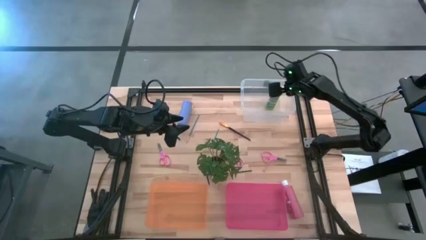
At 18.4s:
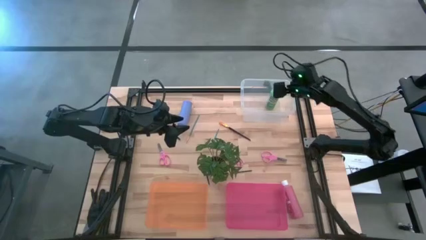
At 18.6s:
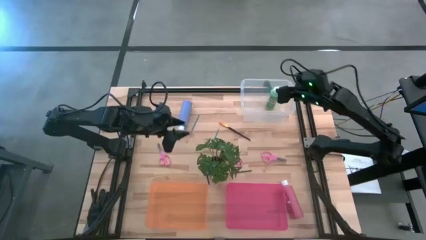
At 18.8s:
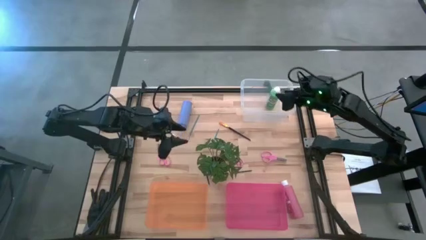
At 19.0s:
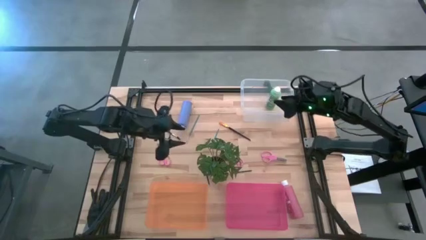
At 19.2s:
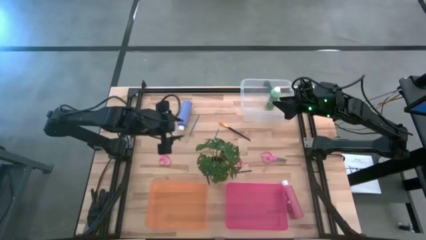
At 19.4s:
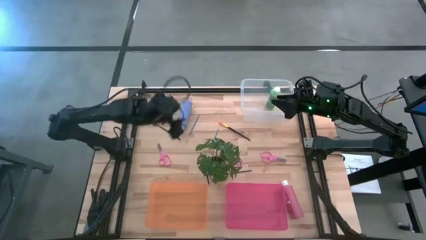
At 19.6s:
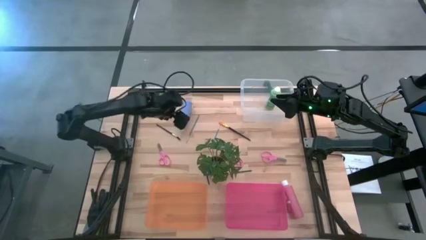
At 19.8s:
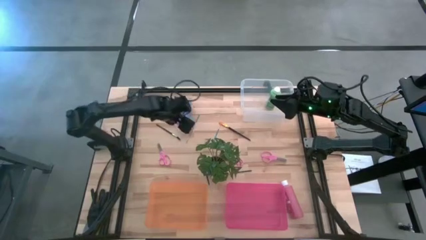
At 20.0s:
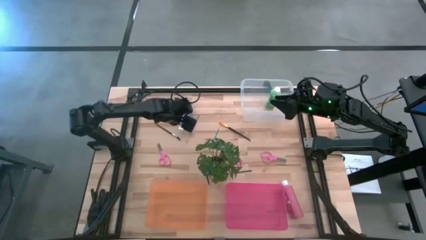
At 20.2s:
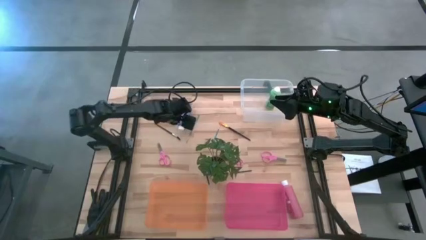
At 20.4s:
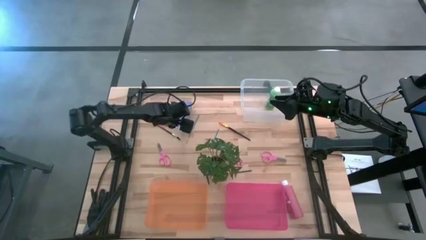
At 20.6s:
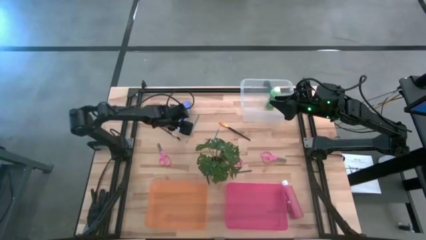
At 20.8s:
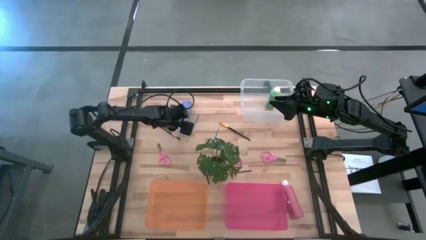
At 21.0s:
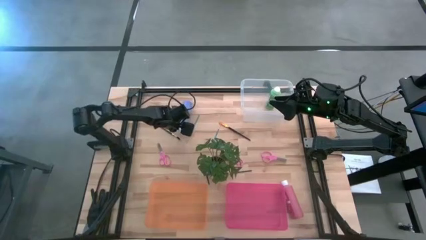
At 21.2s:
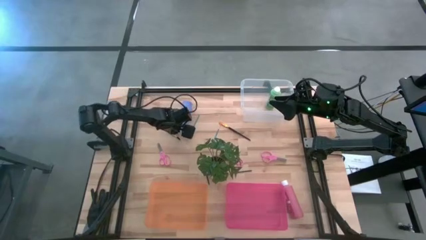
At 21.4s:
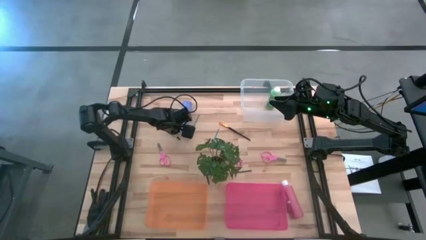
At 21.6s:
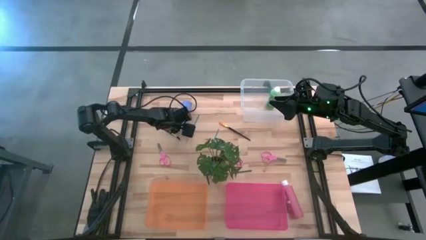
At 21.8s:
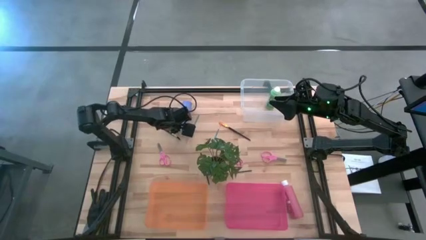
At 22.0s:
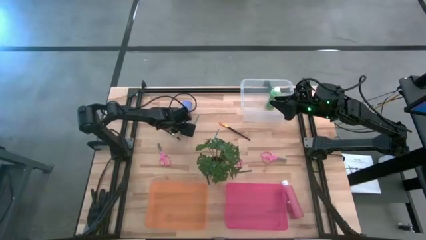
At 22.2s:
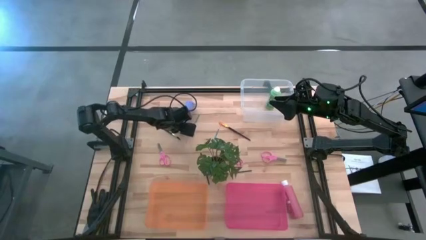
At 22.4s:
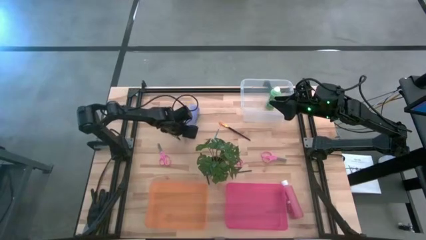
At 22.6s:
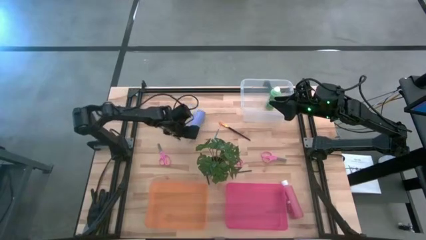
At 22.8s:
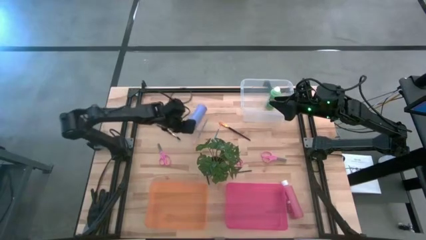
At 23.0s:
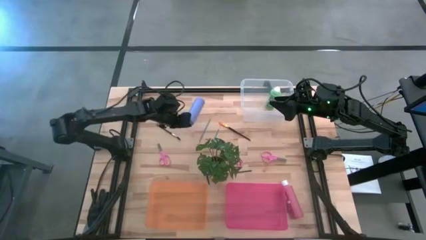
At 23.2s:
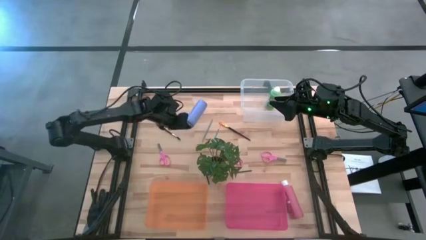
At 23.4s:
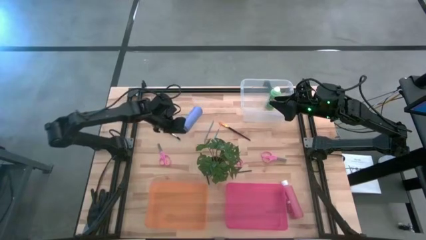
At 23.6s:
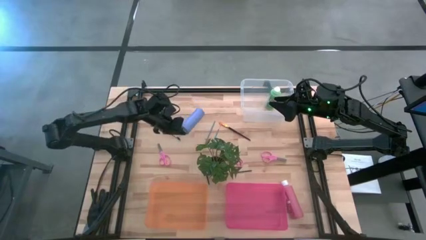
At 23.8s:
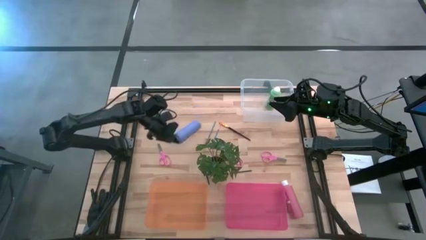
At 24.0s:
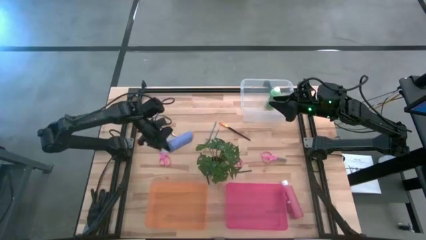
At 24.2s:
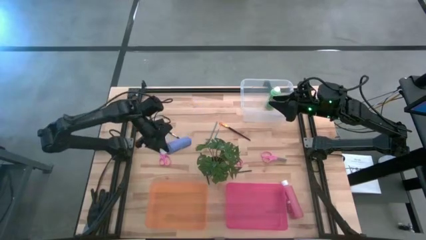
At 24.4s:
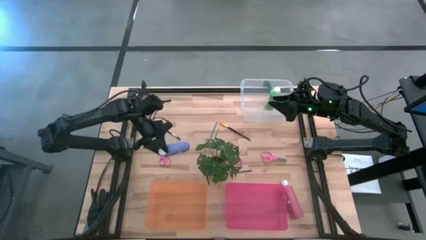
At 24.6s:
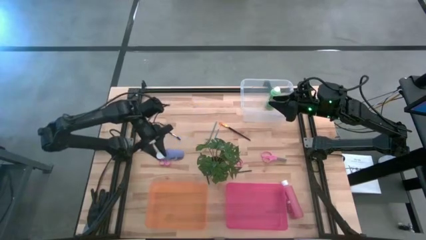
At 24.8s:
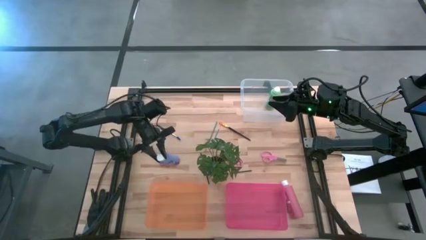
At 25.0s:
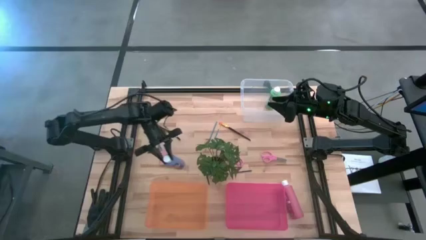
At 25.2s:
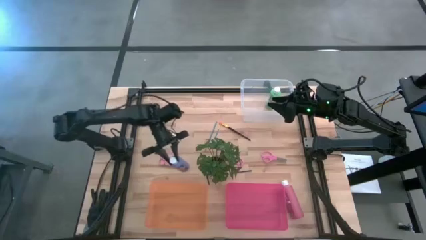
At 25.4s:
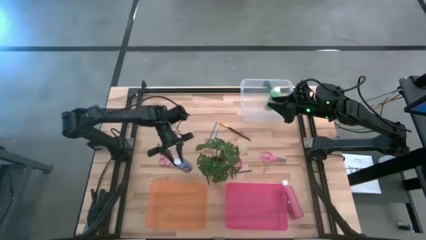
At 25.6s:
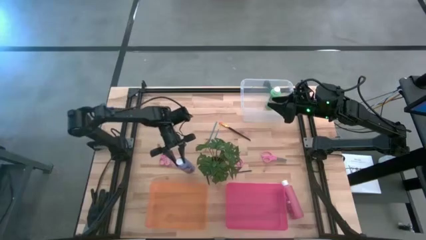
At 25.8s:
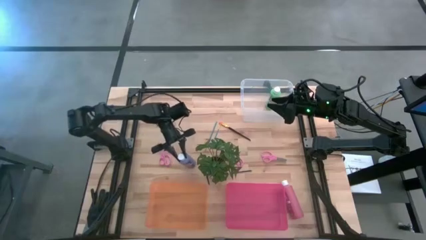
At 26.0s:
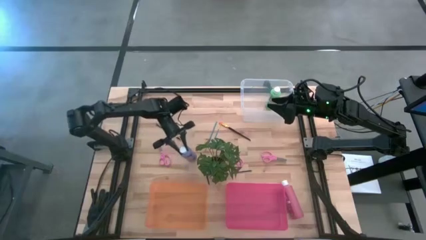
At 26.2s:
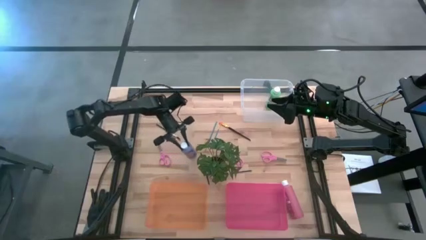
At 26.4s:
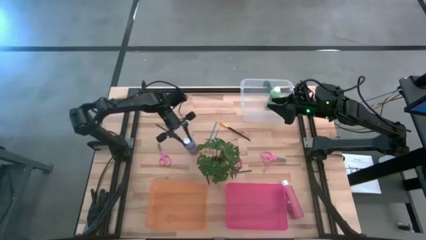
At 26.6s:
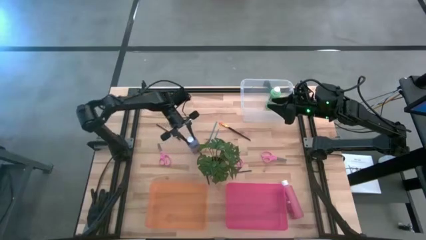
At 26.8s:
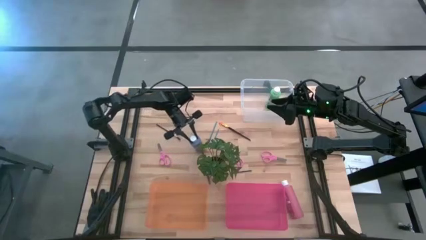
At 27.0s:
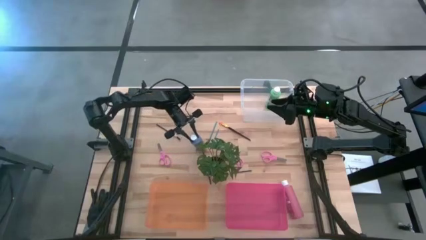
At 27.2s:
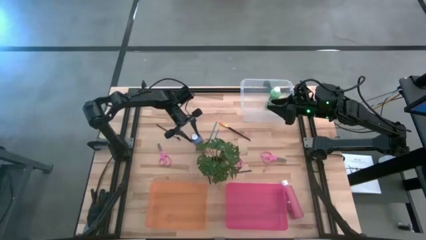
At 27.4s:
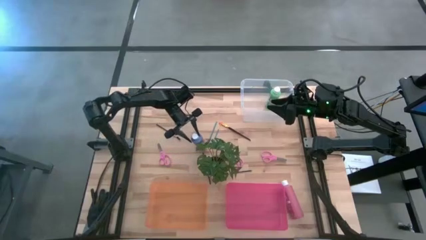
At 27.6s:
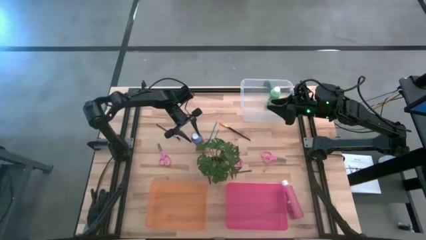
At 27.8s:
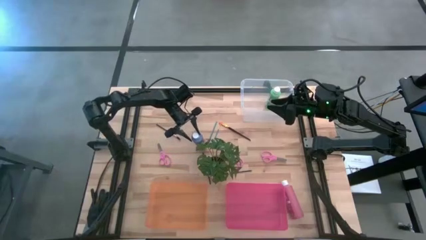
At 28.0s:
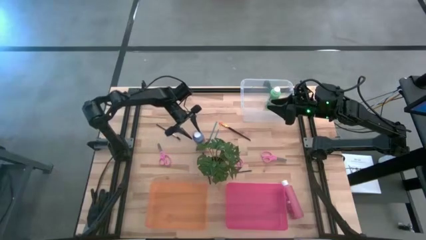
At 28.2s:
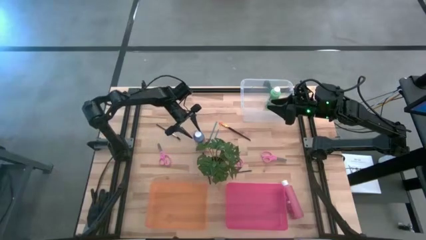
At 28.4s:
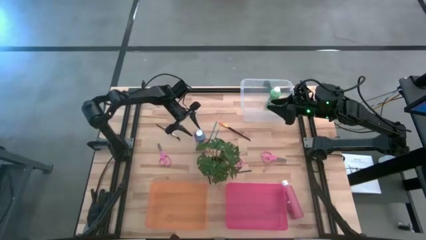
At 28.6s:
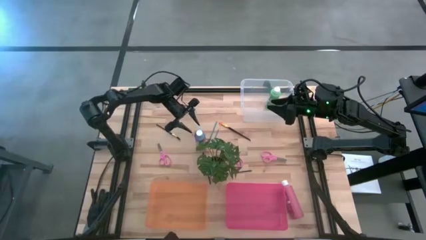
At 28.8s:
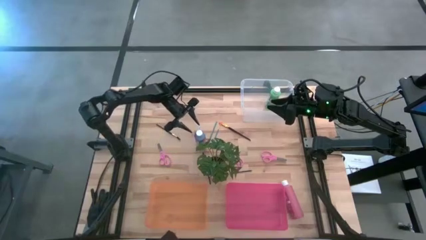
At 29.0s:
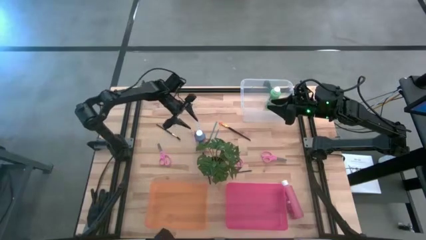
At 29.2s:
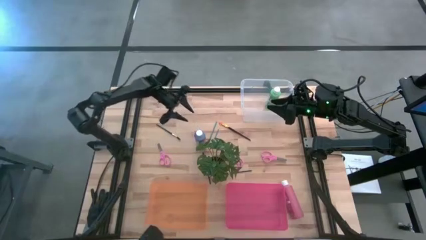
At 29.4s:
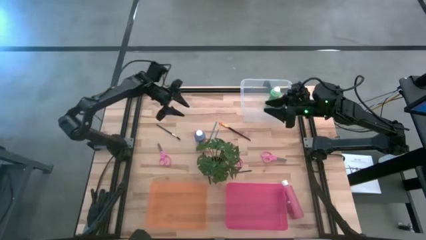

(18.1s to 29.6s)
Task: Pick & Place Paint Supplies
Put the purple acrylic craft paint bottle into the transparent bin
